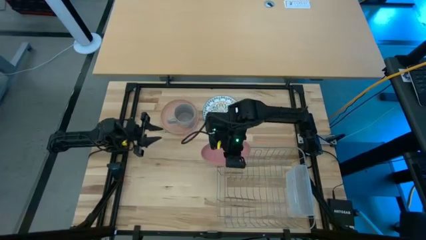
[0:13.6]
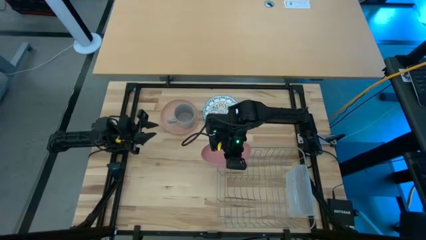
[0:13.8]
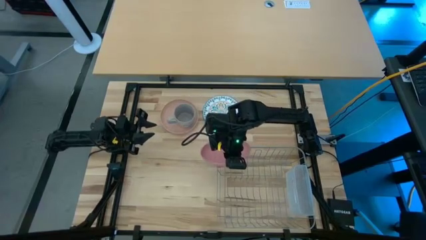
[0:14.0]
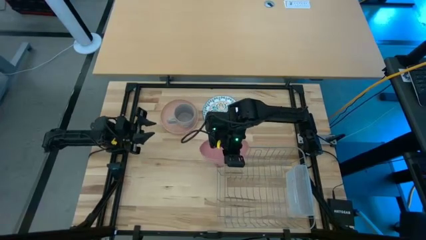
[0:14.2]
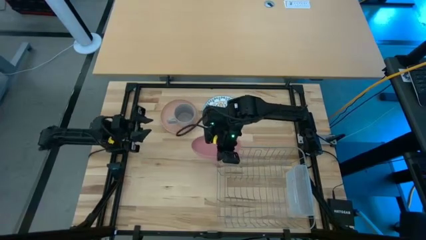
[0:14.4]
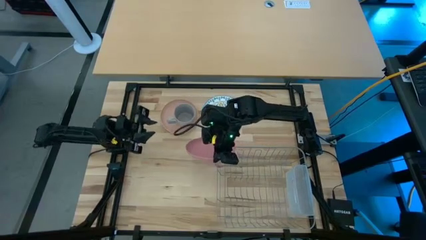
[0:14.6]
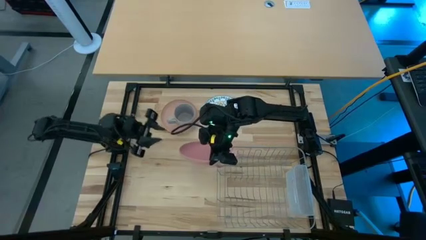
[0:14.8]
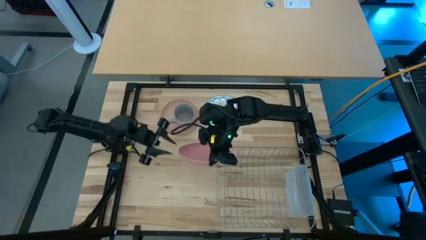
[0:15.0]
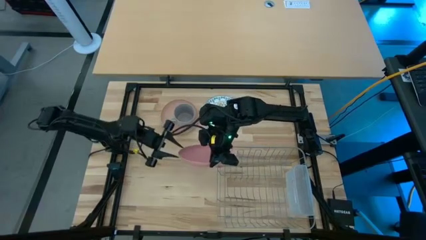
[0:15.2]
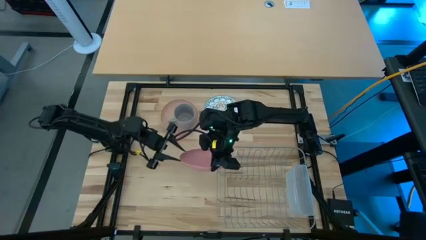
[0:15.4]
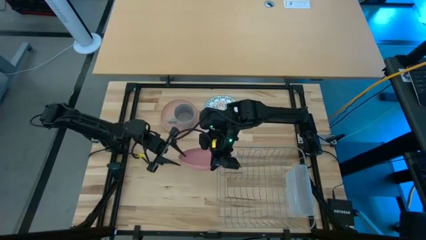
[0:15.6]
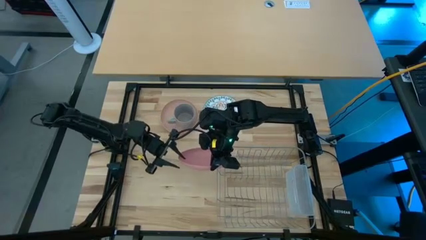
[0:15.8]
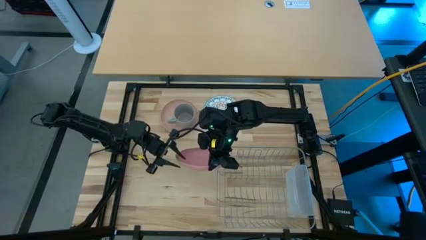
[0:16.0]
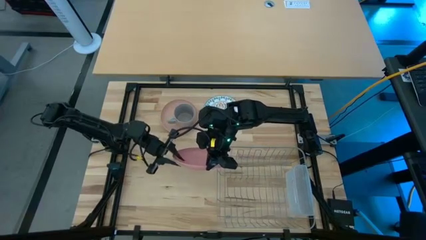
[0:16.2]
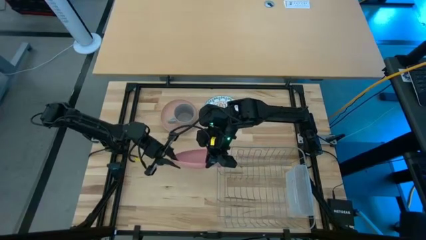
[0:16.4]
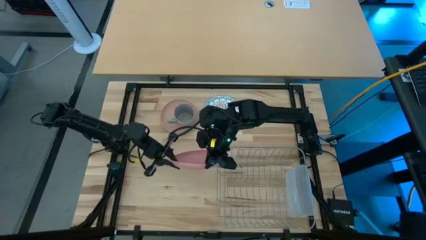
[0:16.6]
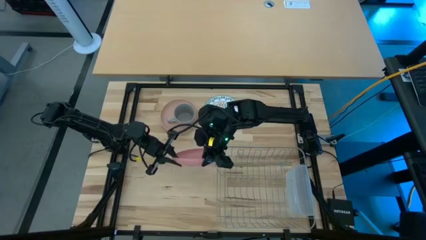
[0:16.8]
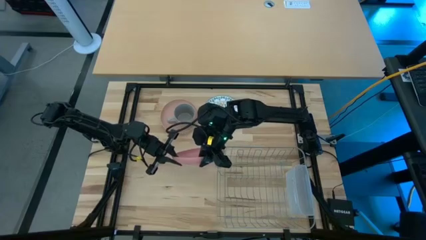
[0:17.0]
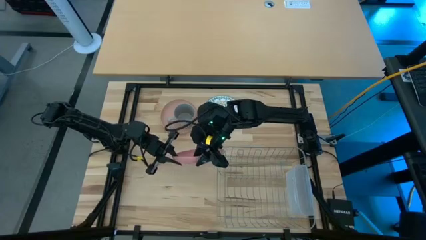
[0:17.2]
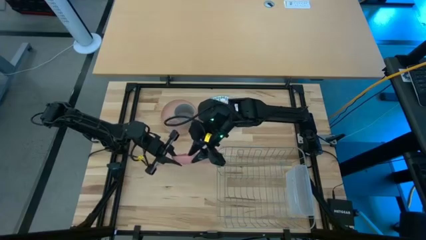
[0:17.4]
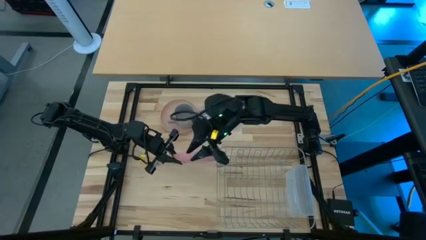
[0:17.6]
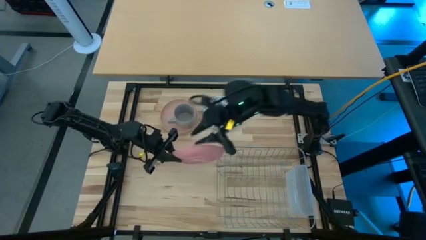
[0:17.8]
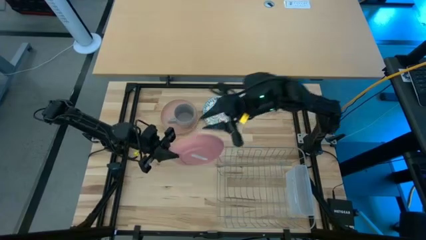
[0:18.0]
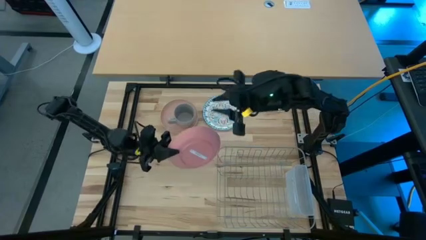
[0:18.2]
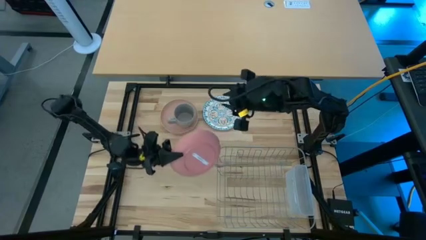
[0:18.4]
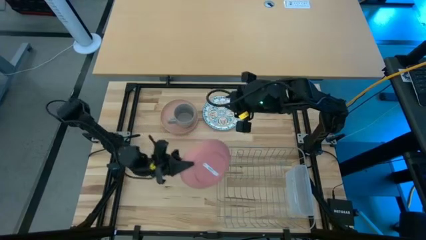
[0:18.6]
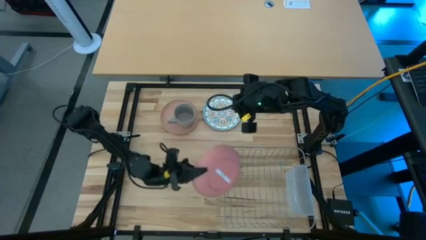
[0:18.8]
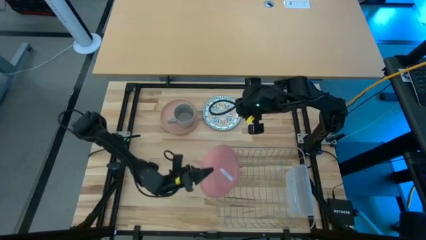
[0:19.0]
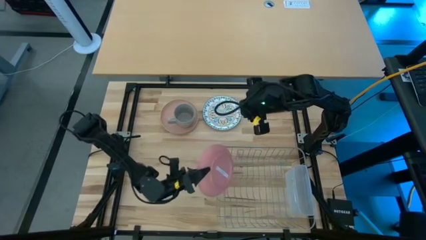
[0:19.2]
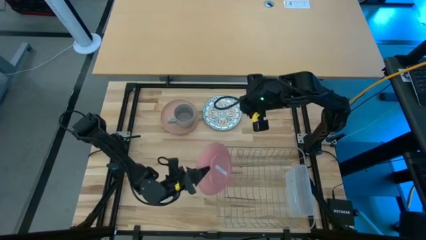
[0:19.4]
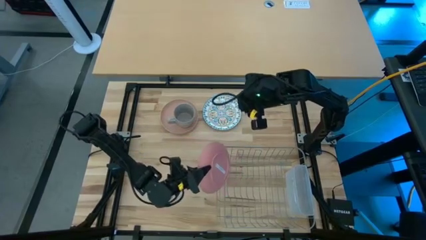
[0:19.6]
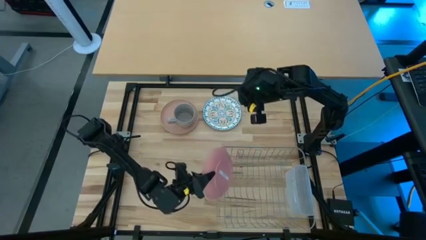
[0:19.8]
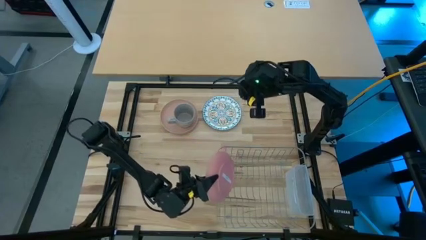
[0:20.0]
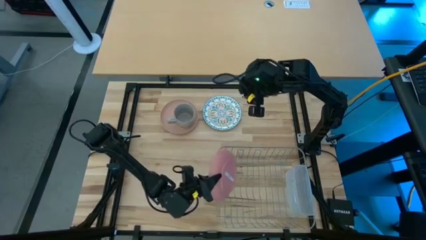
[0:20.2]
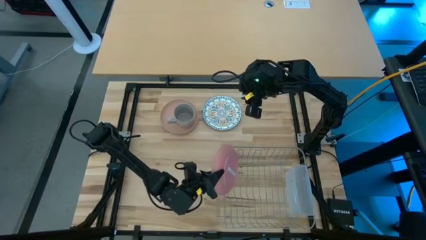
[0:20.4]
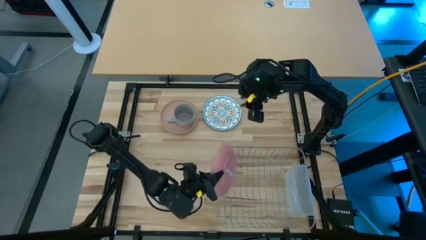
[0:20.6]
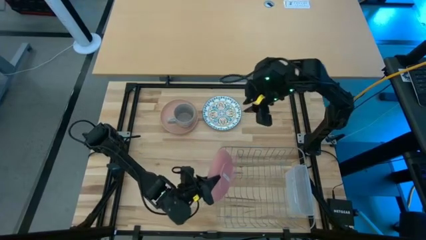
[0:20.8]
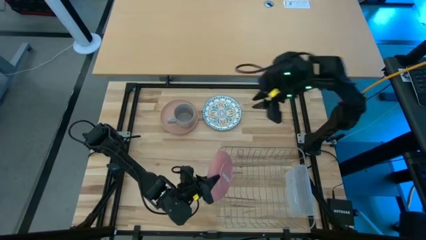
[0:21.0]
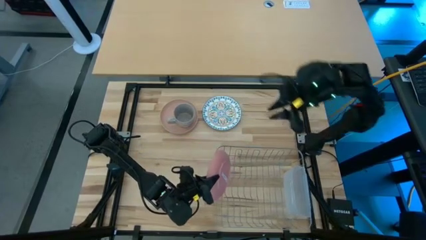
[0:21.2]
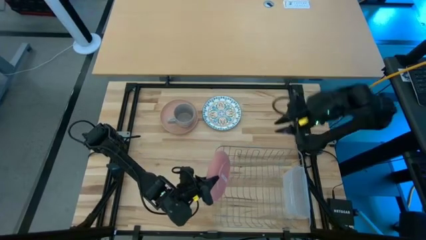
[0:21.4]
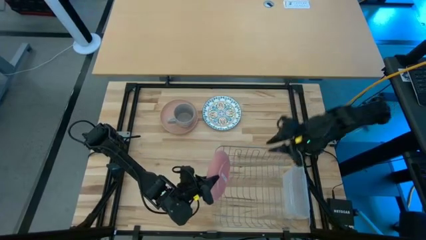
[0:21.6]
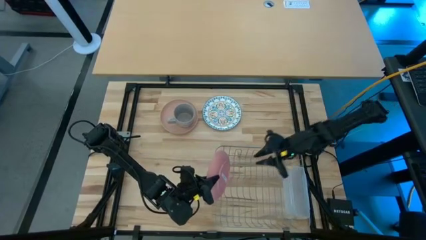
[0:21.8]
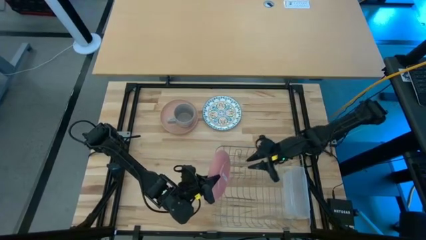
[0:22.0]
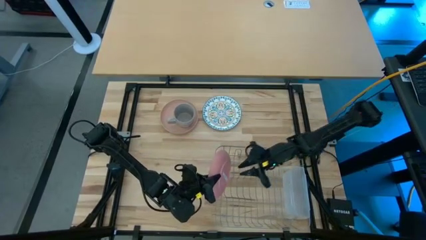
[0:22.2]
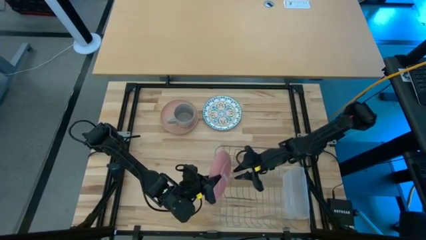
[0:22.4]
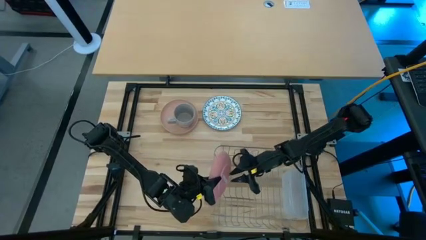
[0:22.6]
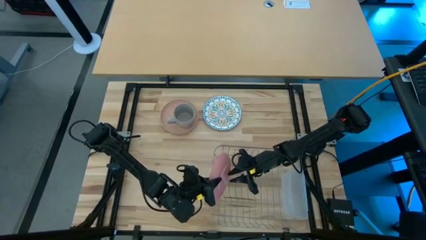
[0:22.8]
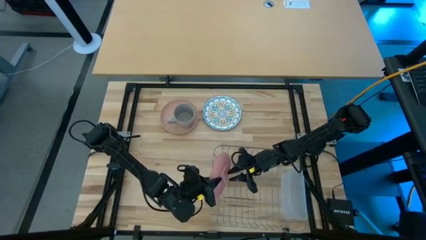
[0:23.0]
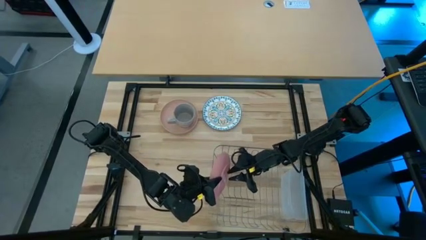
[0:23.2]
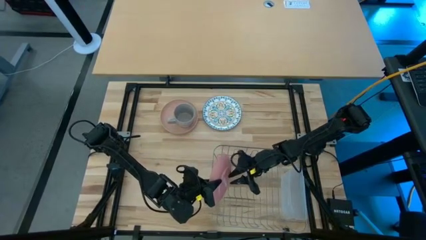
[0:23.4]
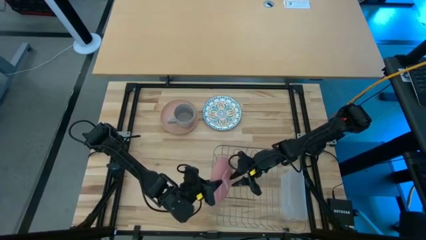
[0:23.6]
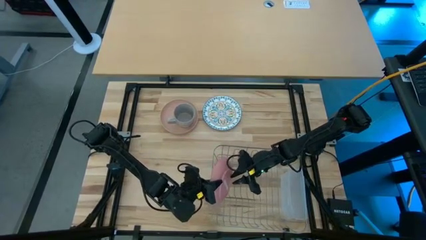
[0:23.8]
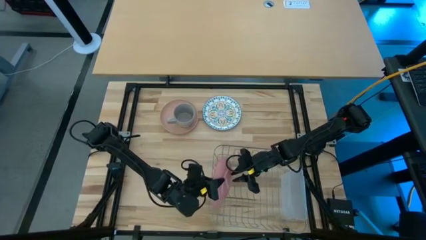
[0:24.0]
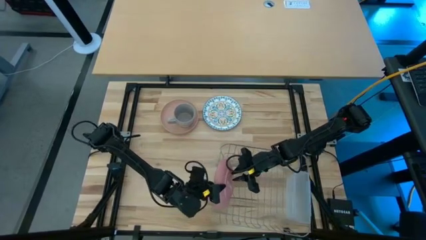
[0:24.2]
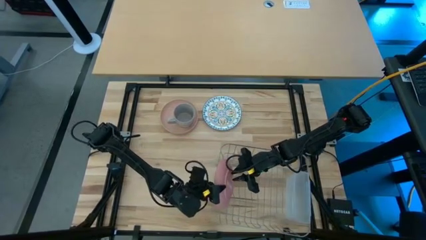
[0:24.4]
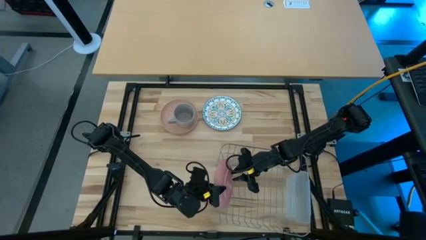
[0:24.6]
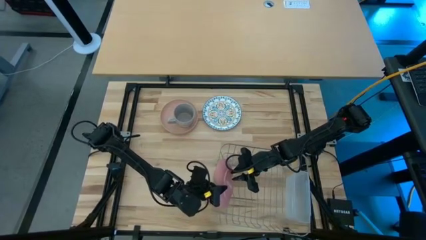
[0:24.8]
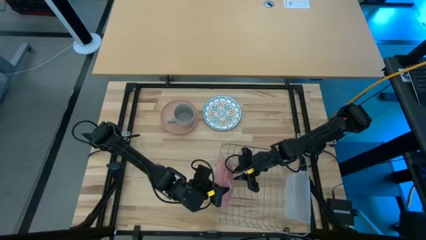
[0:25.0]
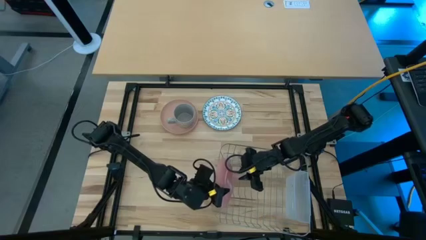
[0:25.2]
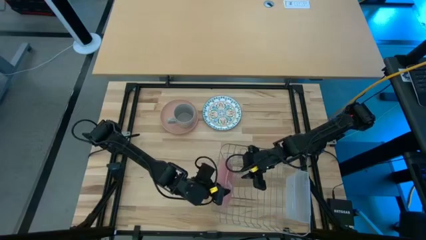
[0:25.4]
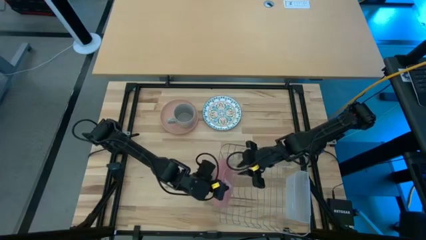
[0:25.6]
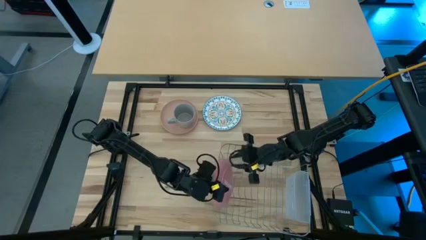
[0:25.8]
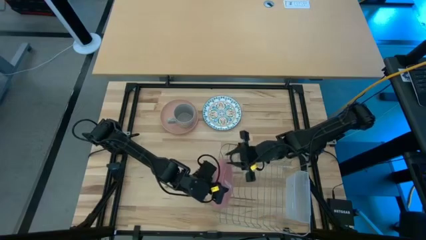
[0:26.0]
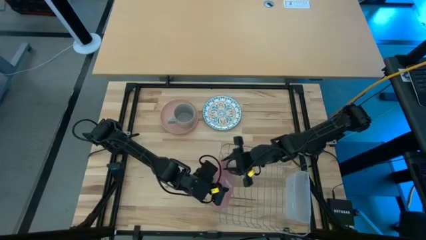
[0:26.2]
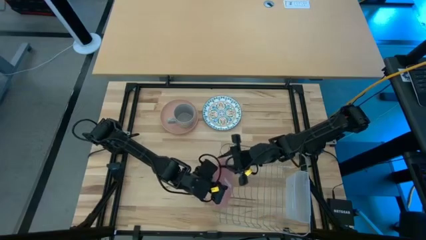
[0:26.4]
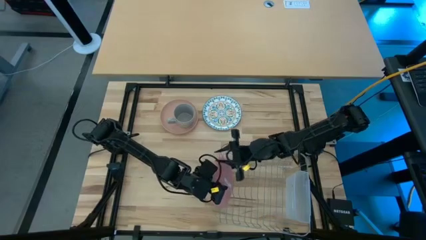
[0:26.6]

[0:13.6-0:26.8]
Task: Sort dishes
Put the pink plate into the dish rack
